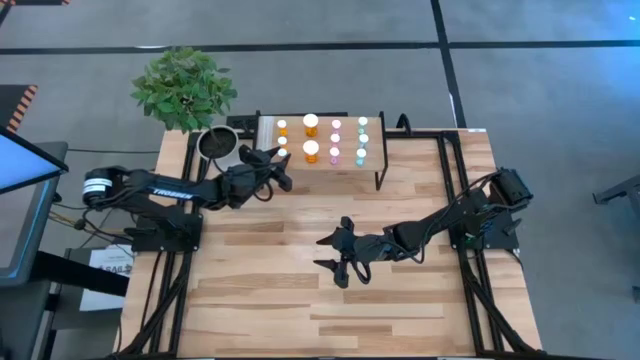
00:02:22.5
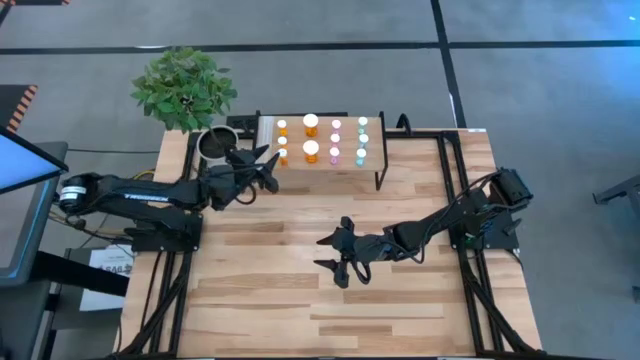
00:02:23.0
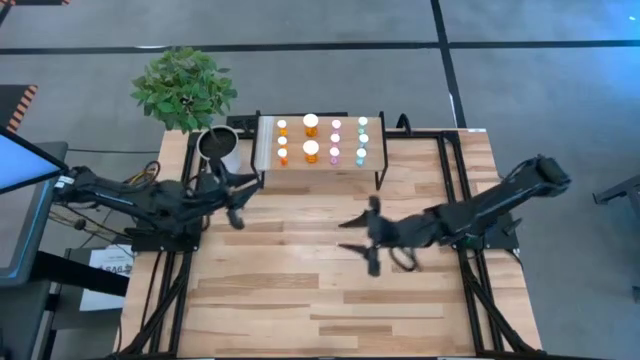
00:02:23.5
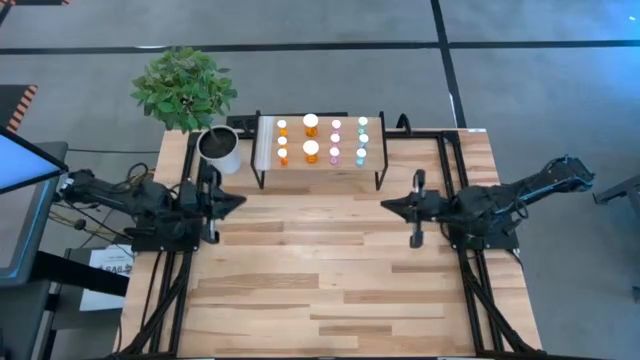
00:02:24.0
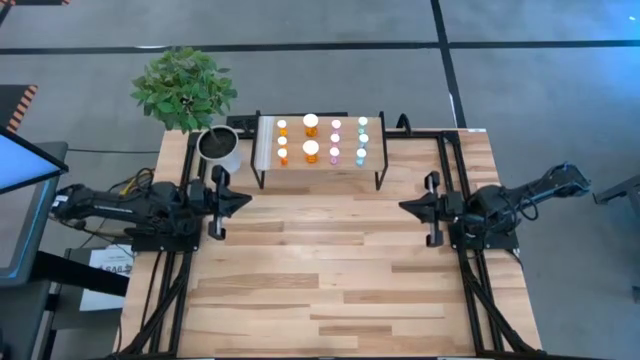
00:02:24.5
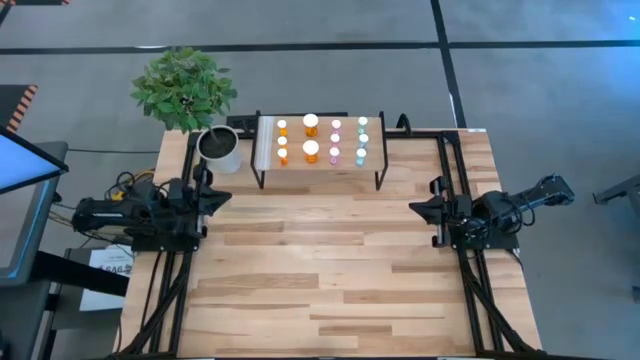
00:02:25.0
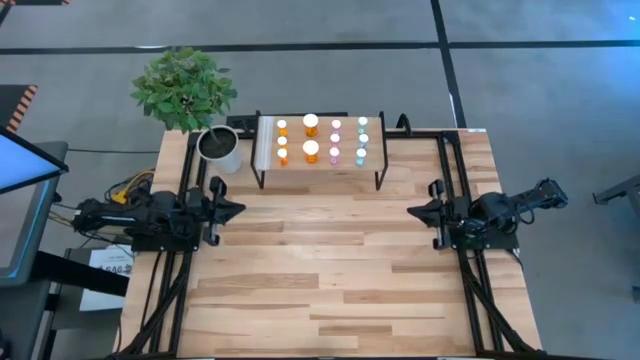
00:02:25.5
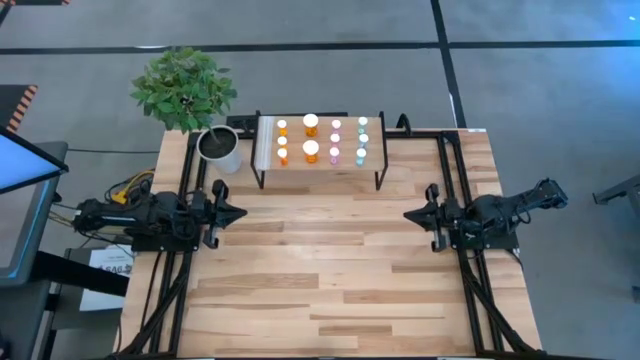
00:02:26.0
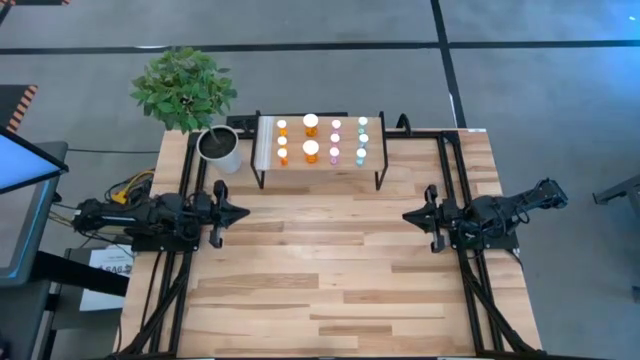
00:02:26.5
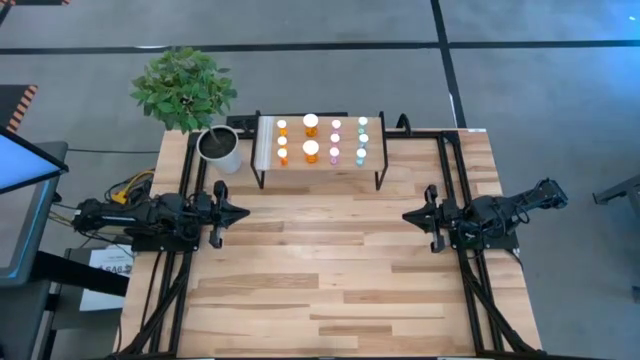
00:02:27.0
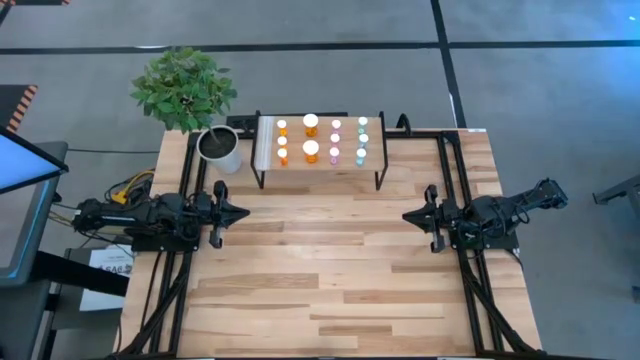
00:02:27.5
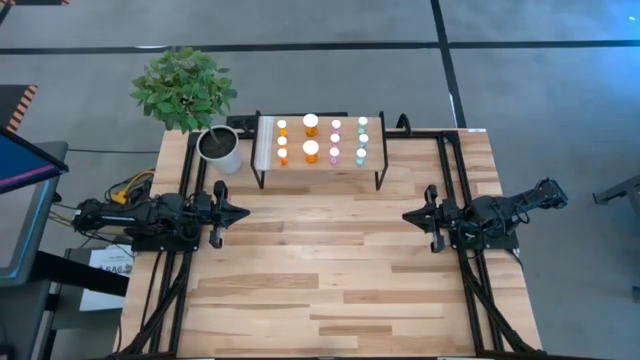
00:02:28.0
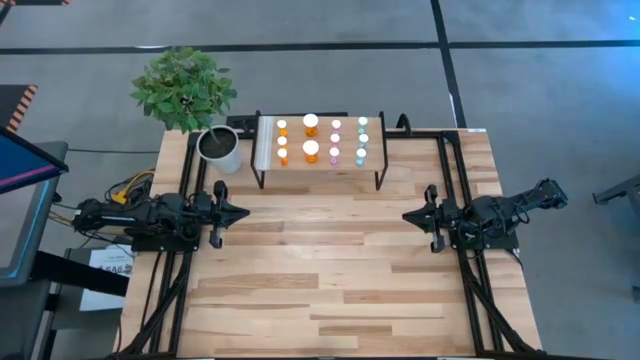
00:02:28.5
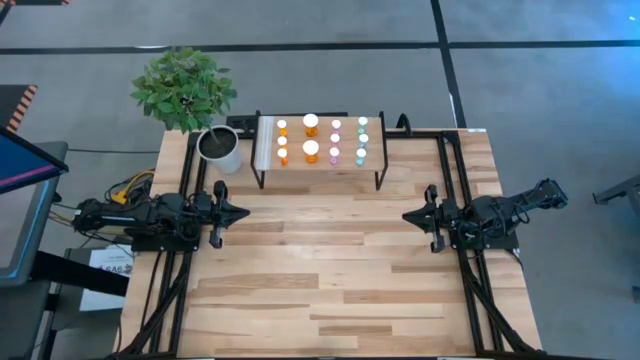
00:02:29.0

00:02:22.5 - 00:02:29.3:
Task: Pick and place medicine bottles onto shelf by color
Return to Home Position

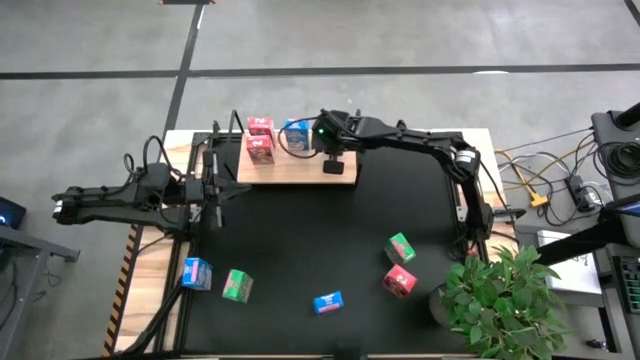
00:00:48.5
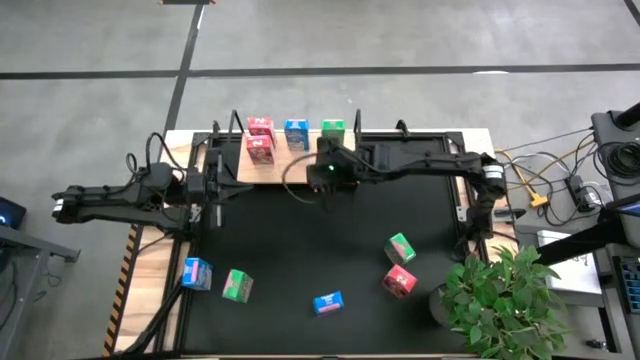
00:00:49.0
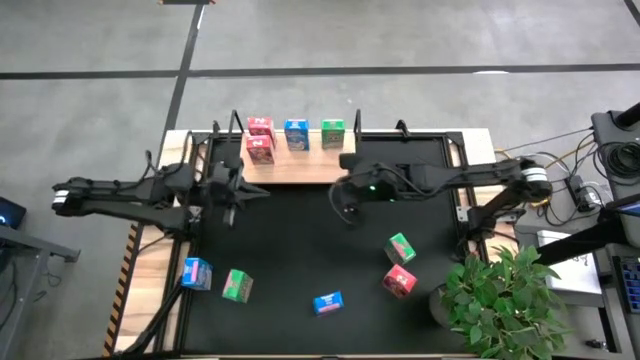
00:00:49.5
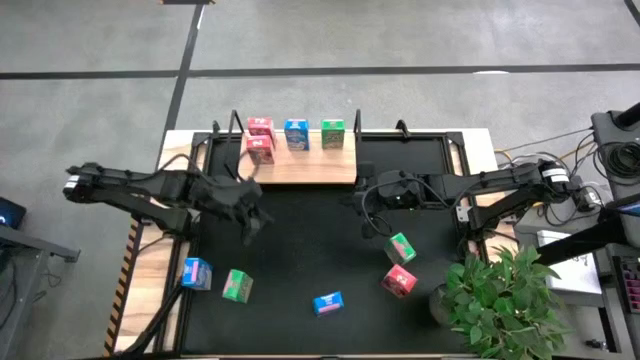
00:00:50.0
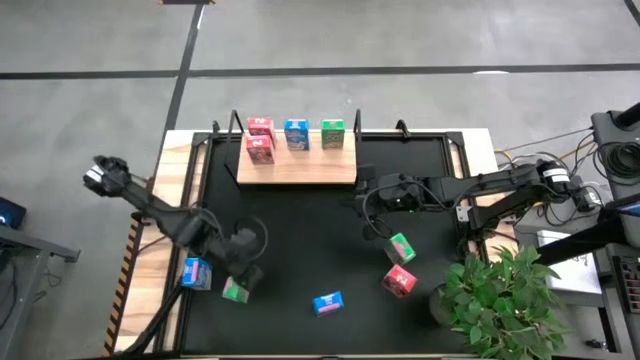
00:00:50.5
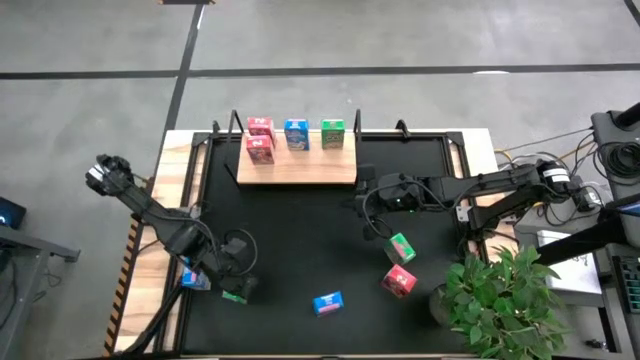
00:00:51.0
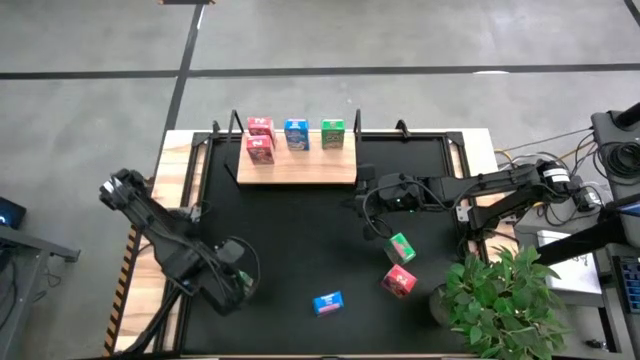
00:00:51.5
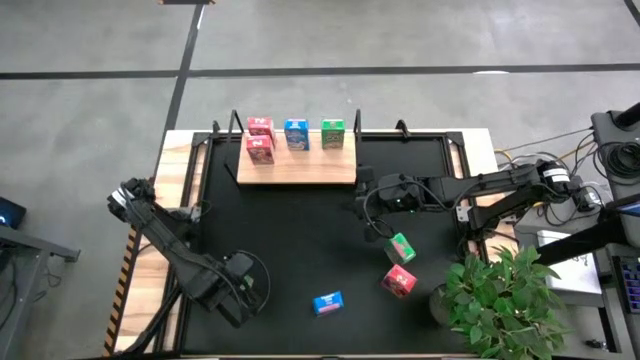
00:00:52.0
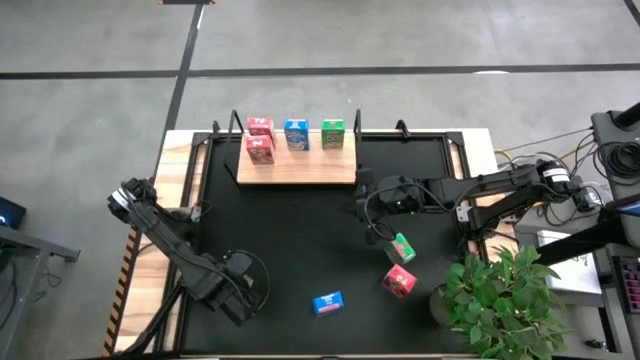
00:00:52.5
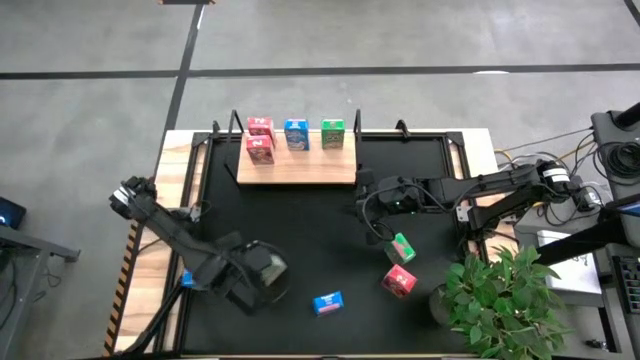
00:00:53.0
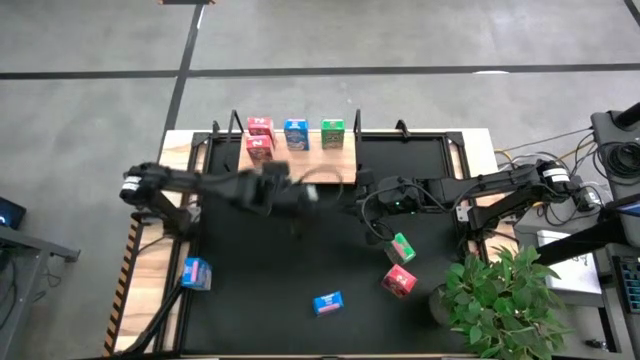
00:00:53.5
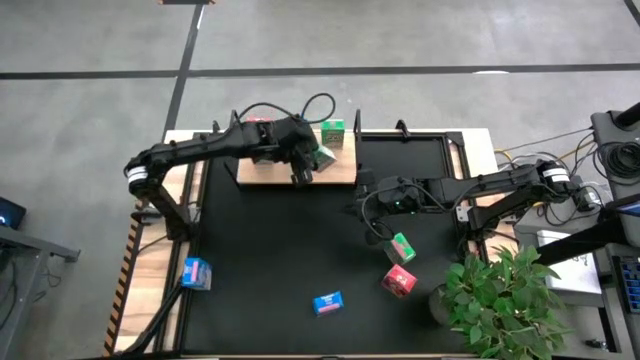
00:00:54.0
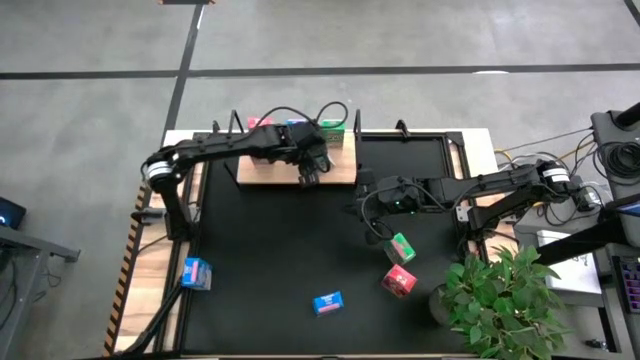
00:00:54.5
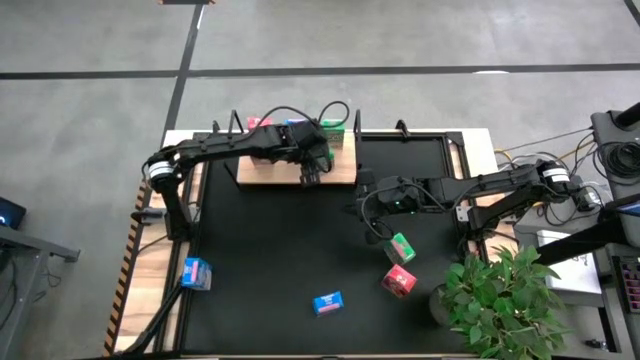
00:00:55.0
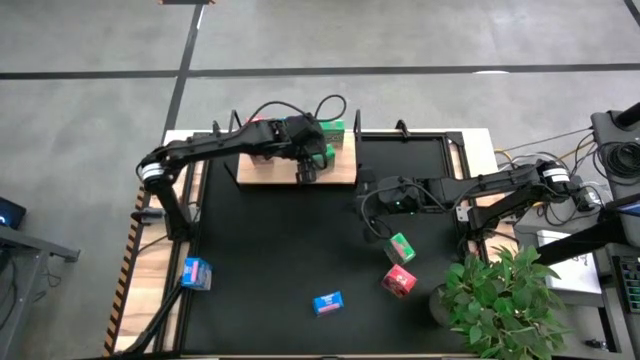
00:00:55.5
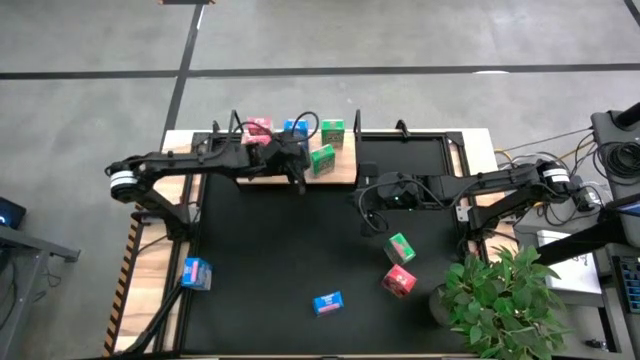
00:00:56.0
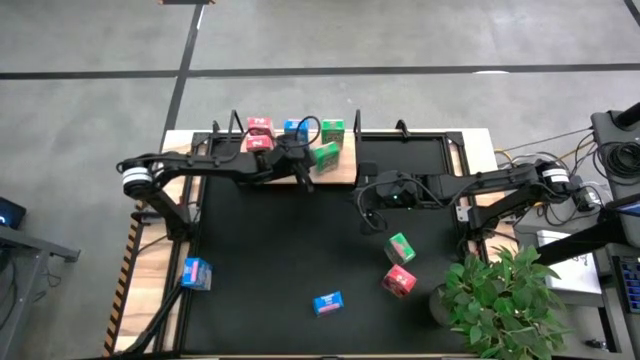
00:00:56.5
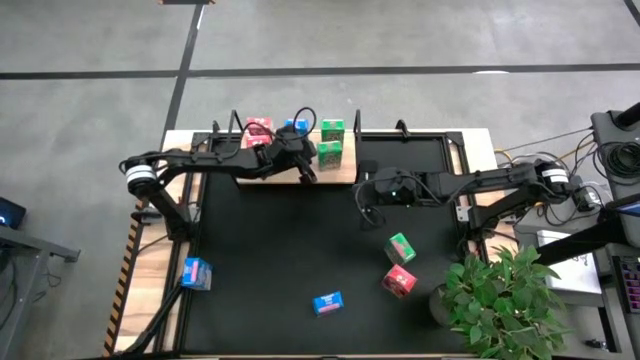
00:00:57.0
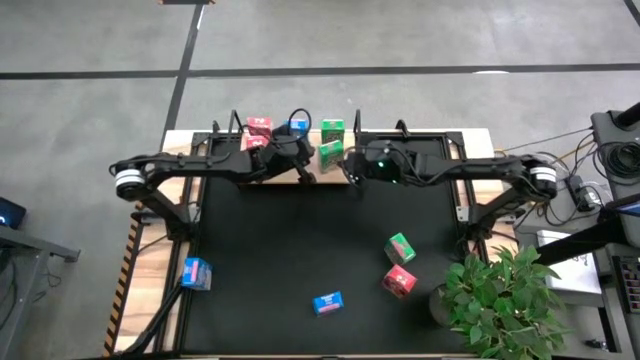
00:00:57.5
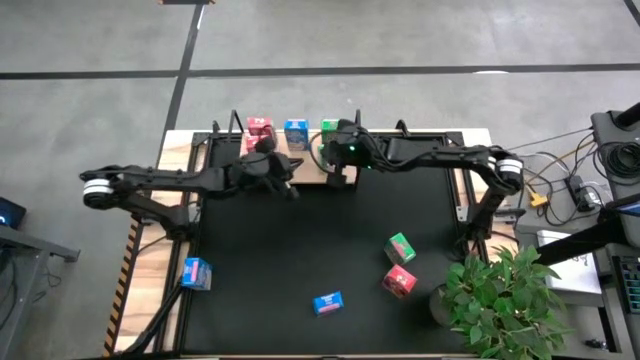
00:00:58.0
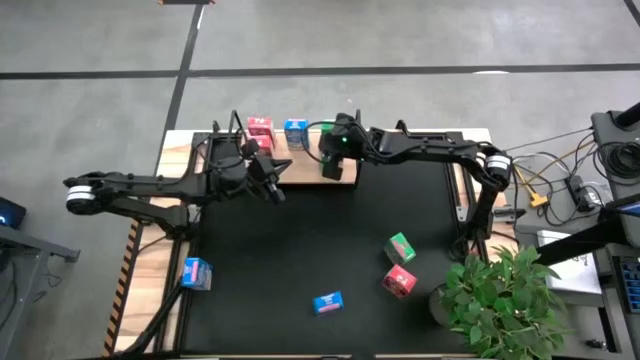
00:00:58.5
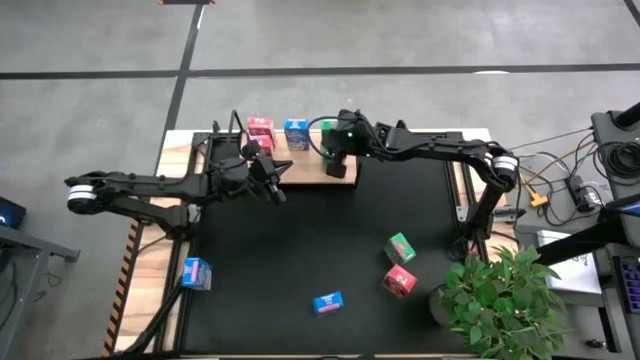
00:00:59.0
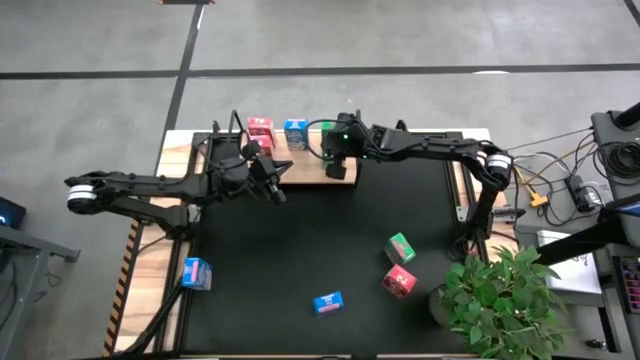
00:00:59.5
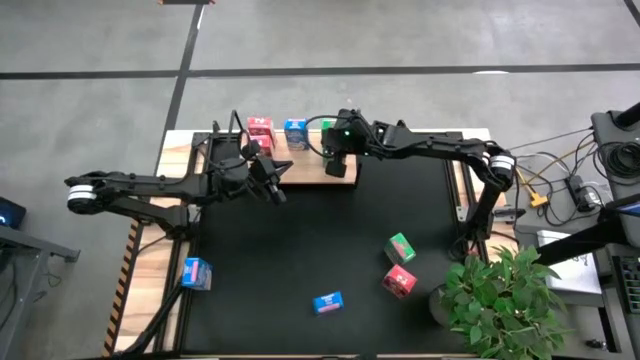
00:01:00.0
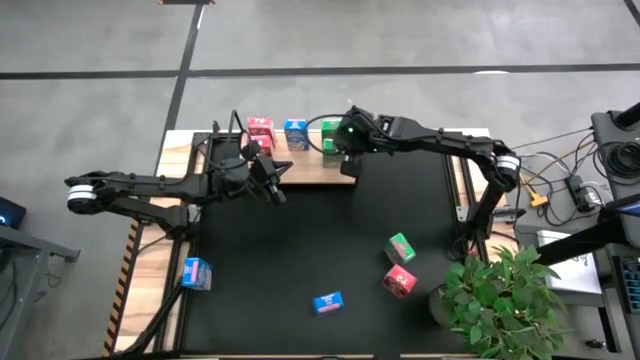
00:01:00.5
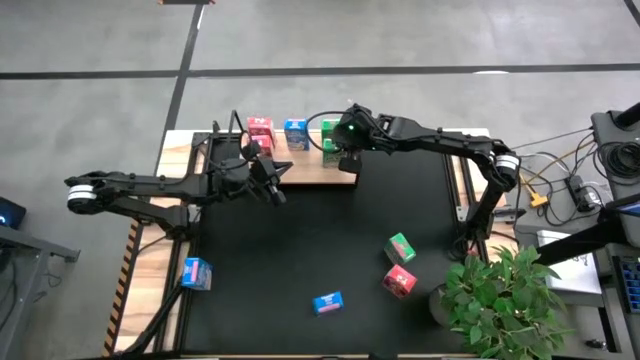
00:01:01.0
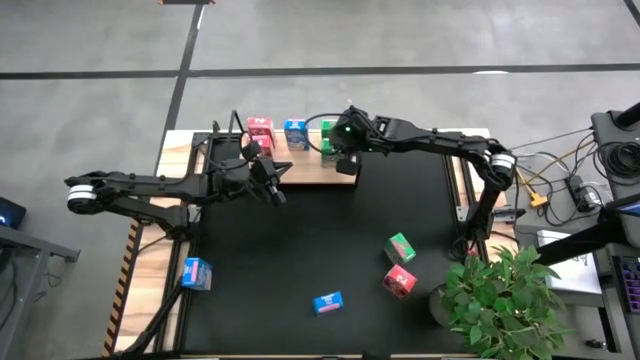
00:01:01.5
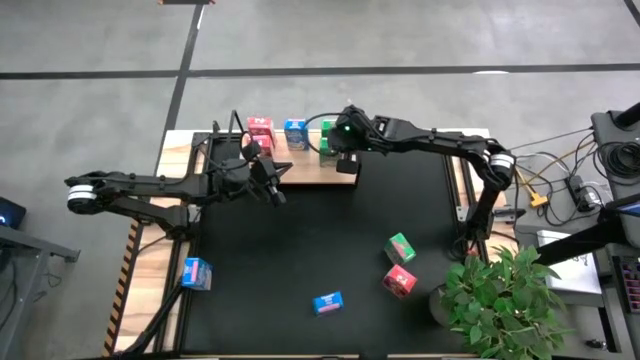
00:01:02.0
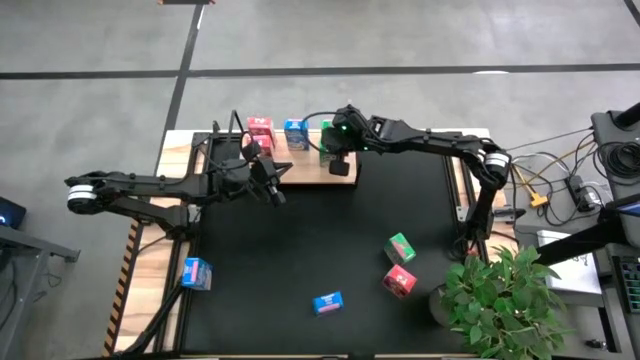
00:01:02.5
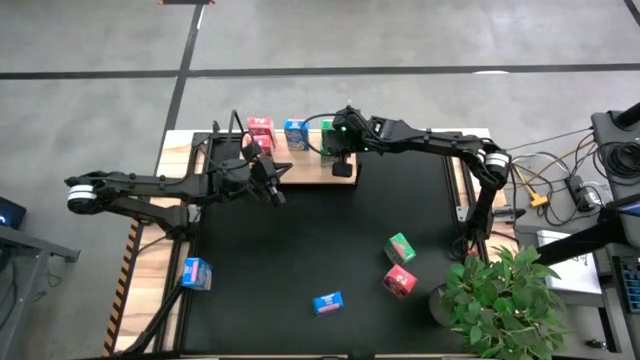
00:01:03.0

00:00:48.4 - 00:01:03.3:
Task: Stack cereal on shelf
Put the bottom green cereal box on the shelf aligned with the other green cereal box
